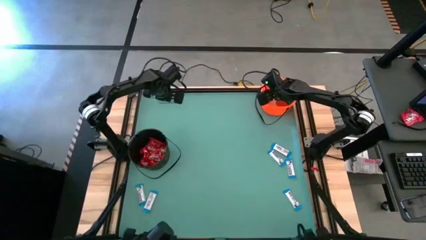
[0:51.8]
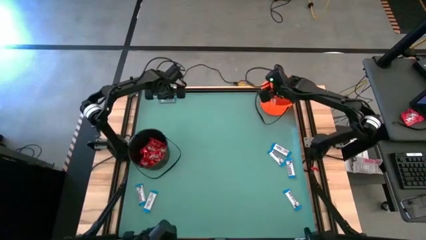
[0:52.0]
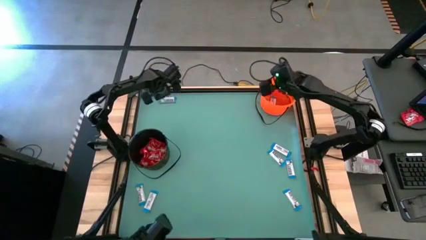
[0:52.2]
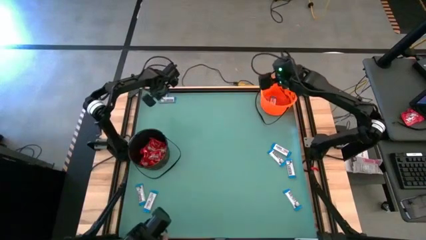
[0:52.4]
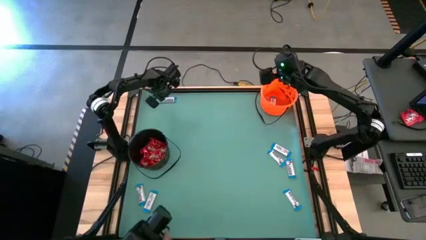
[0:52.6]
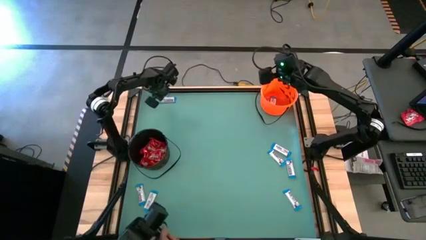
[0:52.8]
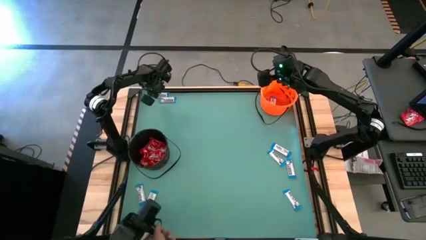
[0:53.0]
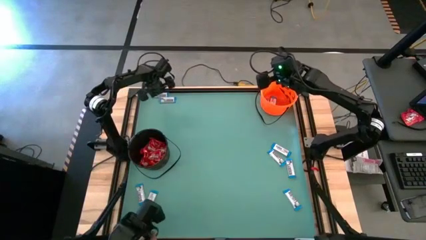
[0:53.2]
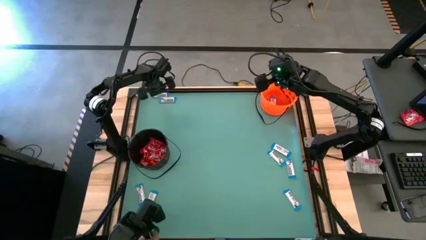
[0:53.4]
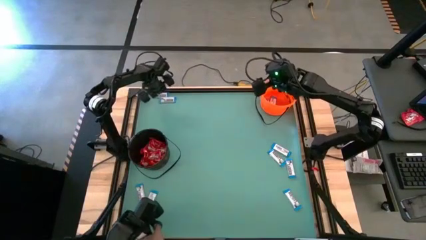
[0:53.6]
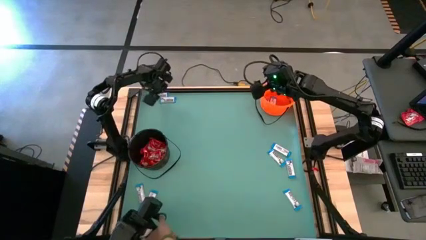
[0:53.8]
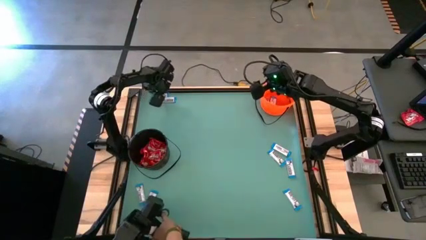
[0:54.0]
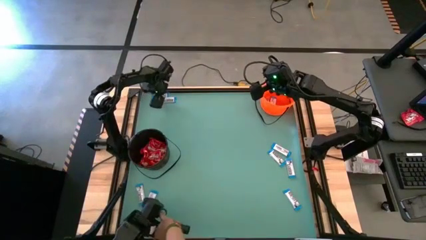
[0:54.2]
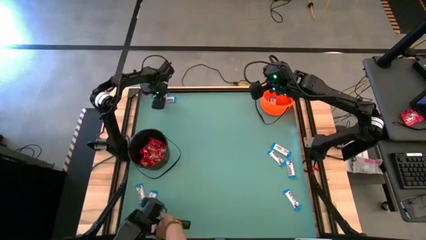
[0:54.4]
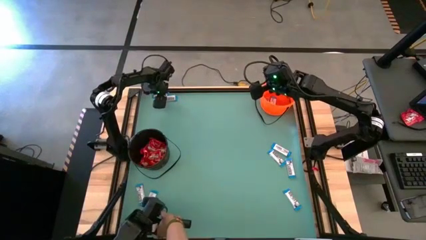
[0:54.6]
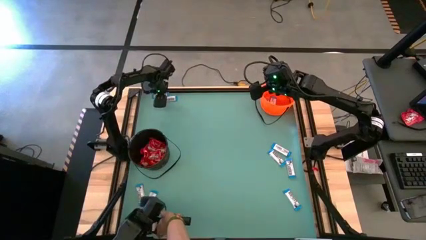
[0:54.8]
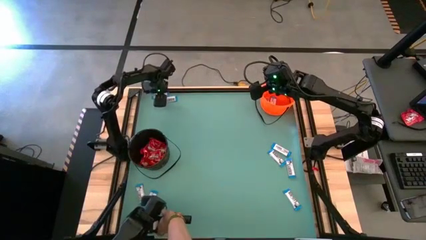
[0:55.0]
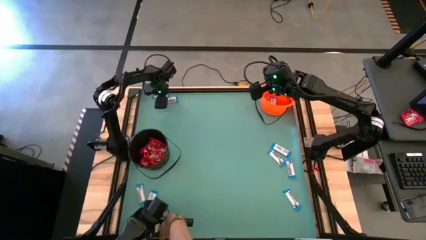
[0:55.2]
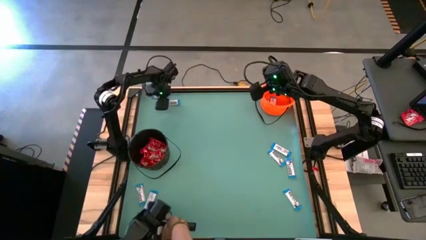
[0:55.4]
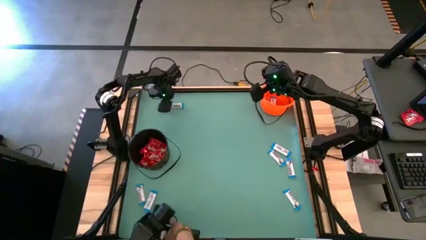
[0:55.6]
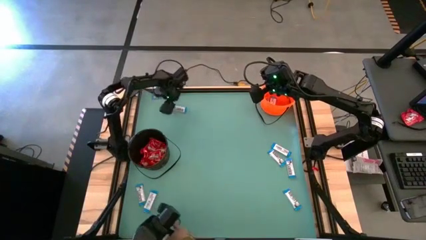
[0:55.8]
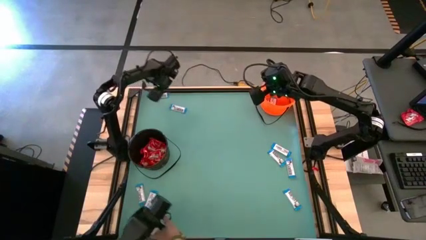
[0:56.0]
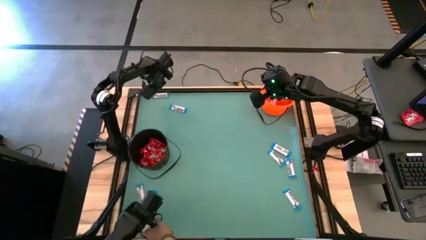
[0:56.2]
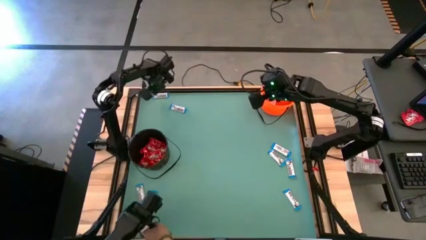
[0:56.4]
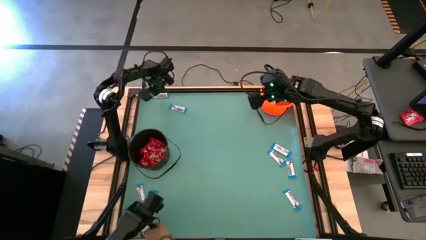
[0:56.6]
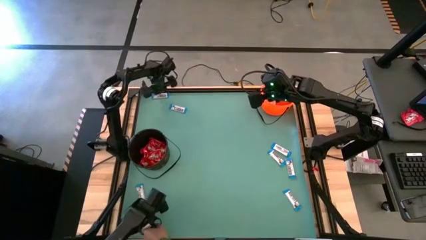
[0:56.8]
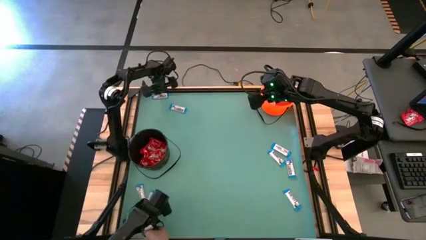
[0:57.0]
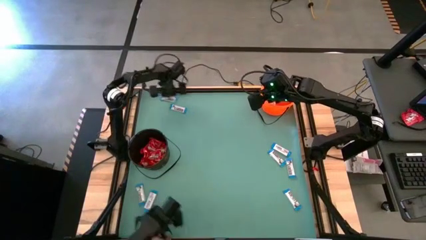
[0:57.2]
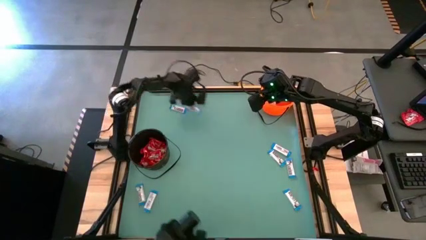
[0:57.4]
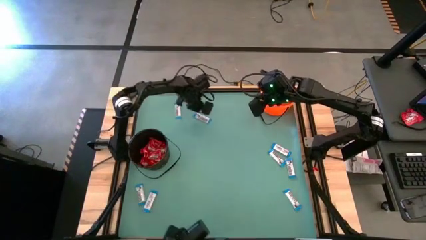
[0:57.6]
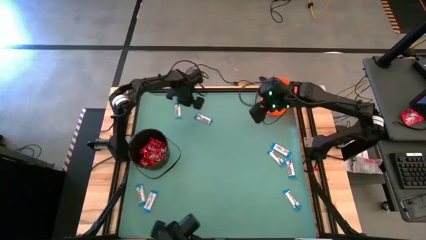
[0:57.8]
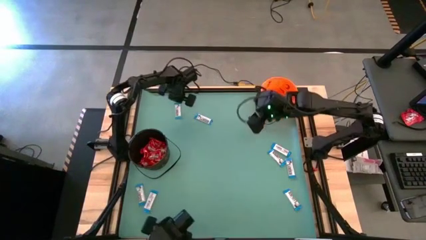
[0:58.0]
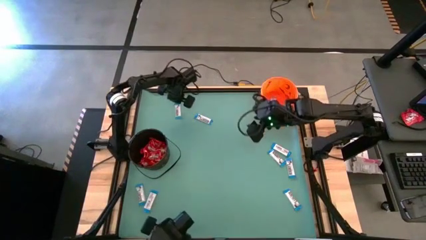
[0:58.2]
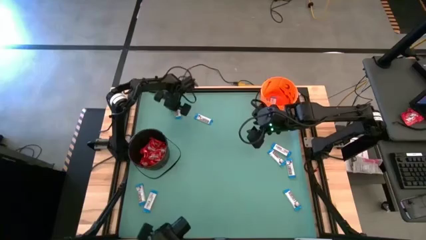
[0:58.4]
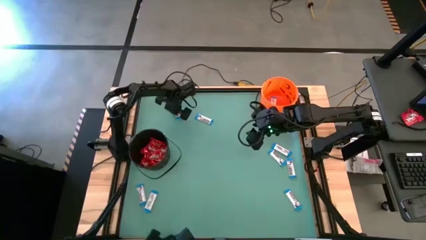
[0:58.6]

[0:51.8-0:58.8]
Task: Sort candy by brand, put in halloween buckets
Sort the white chocolates

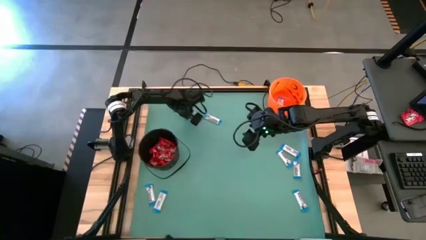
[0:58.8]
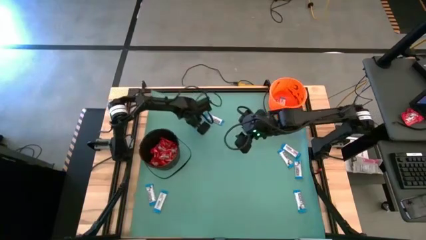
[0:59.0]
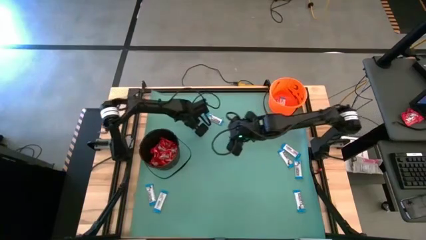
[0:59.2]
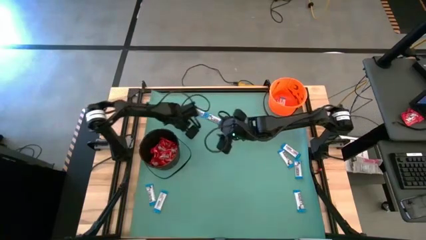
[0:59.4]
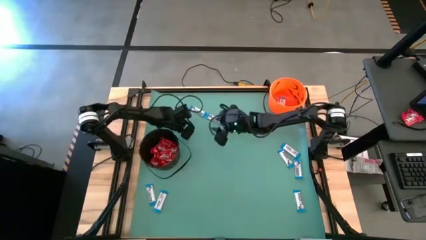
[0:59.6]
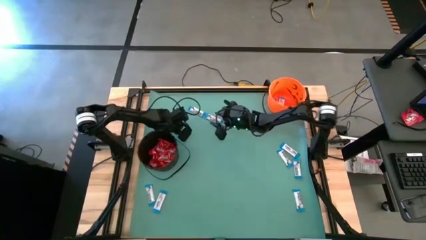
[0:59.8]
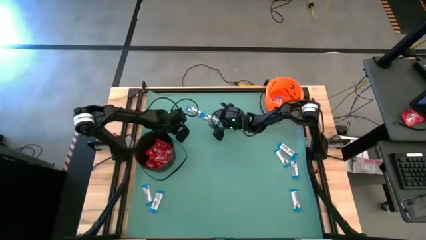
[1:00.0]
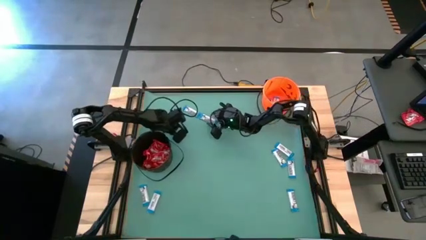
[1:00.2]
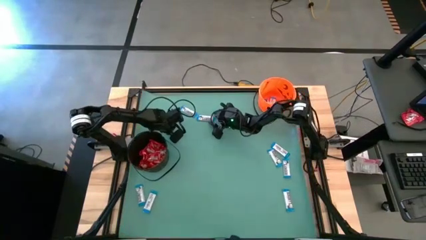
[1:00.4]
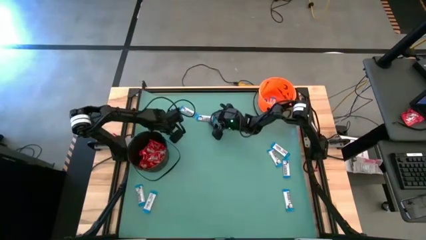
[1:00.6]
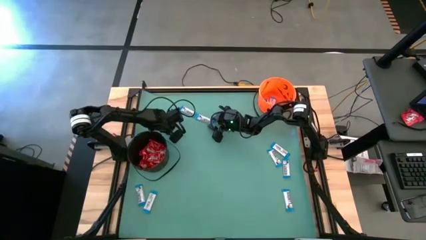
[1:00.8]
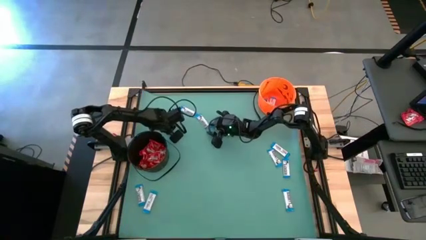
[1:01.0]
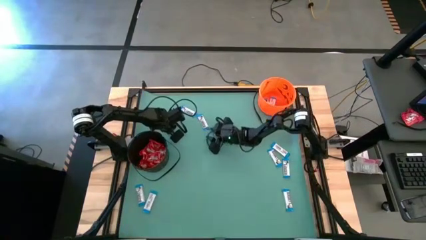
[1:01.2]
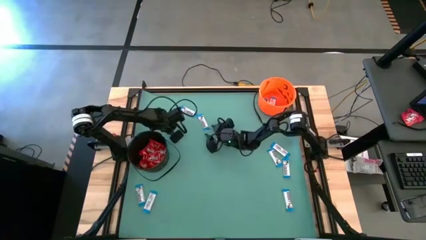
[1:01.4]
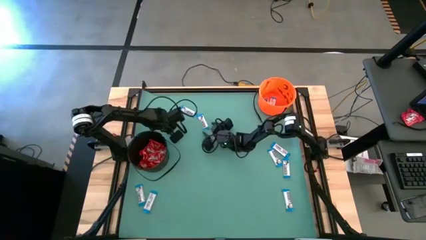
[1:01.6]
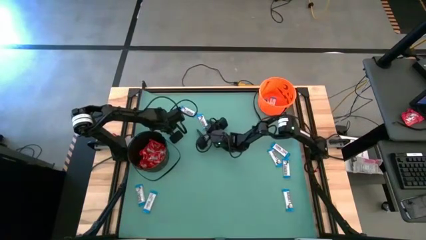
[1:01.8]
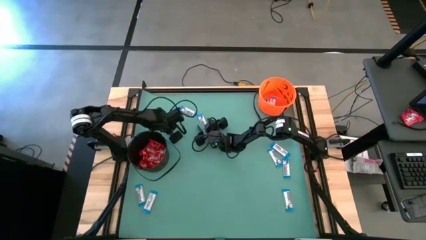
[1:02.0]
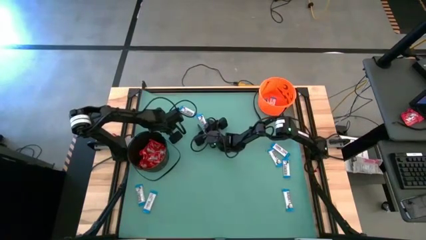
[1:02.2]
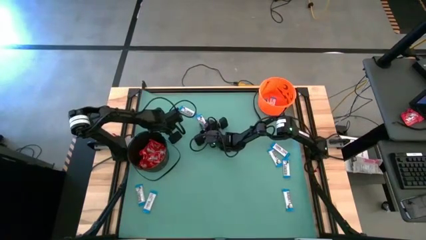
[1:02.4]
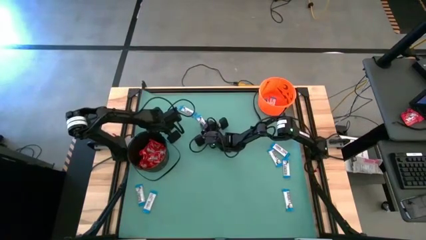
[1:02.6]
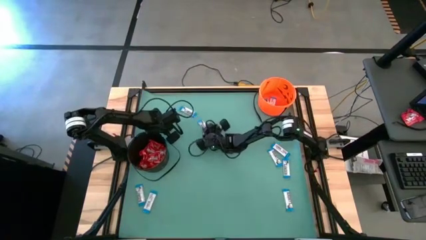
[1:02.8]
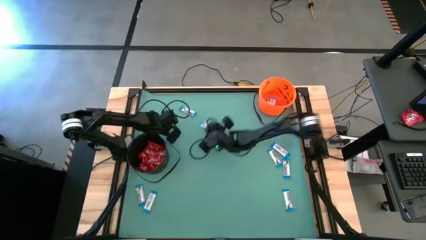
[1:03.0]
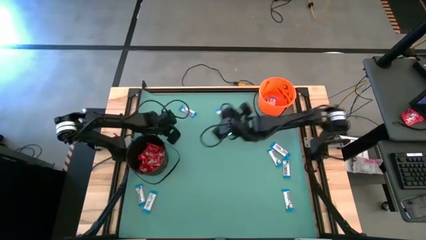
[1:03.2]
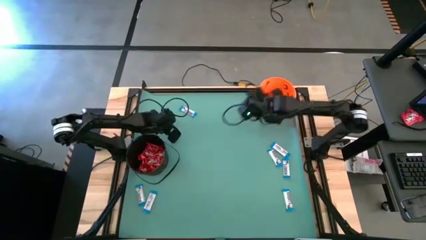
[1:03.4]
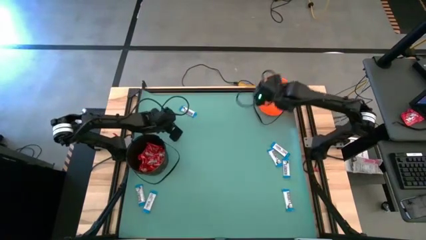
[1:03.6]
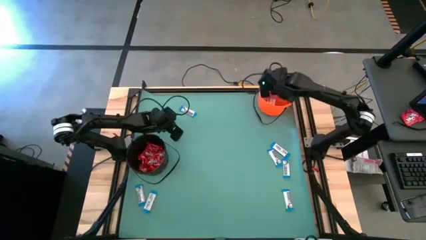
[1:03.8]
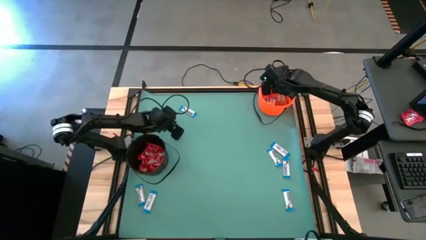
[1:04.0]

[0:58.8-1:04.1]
Put the white chocolate into the orange bucket

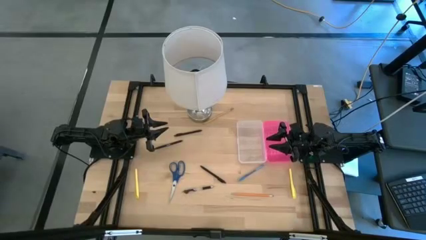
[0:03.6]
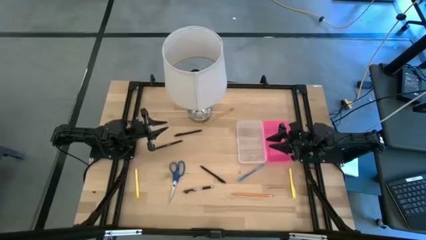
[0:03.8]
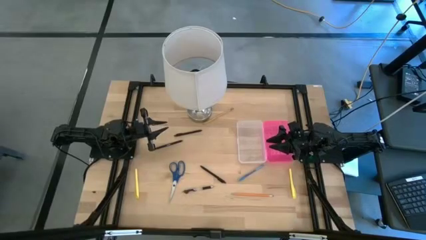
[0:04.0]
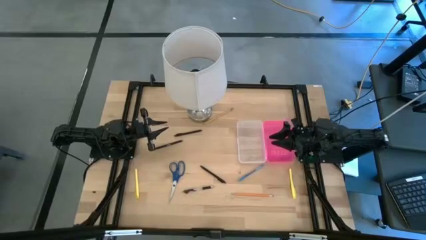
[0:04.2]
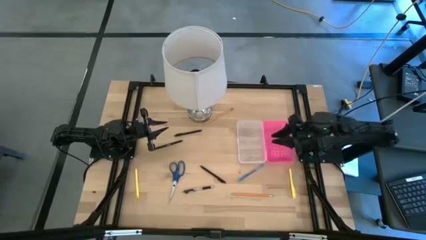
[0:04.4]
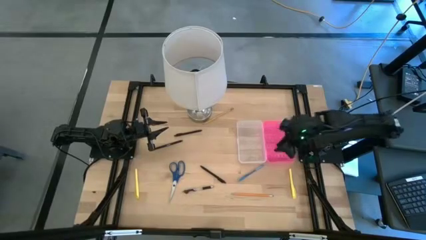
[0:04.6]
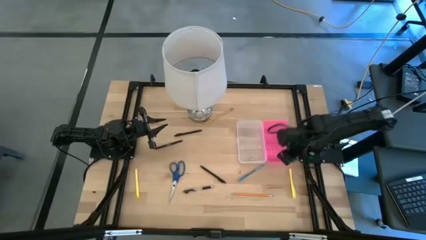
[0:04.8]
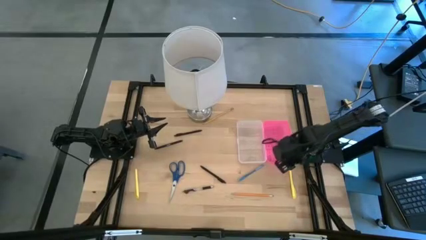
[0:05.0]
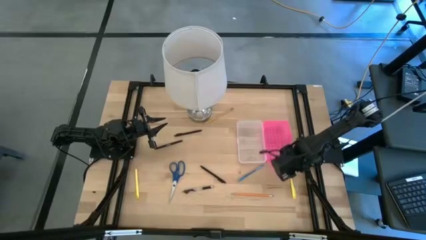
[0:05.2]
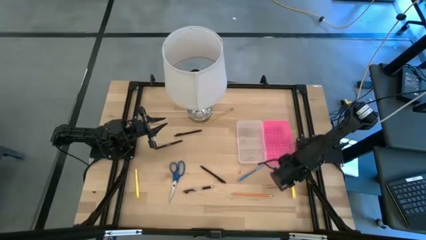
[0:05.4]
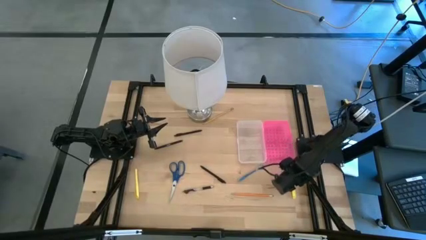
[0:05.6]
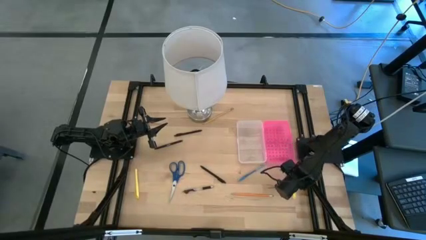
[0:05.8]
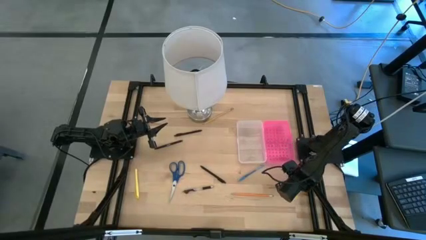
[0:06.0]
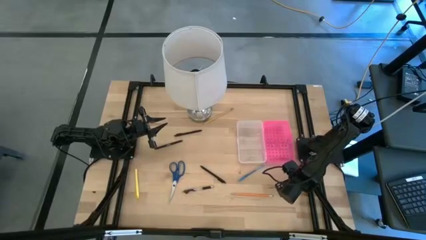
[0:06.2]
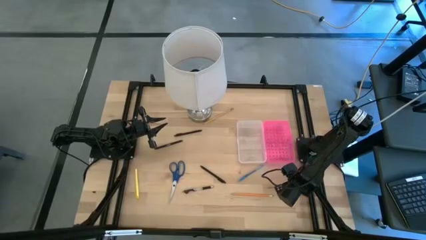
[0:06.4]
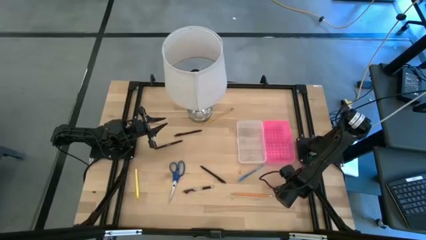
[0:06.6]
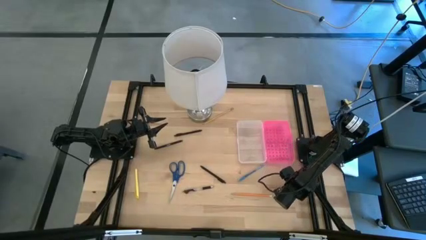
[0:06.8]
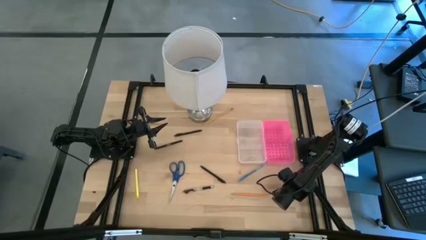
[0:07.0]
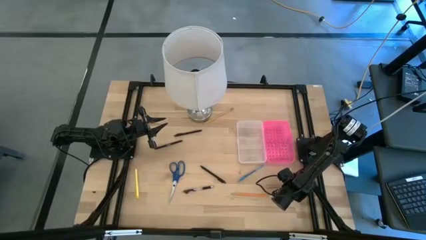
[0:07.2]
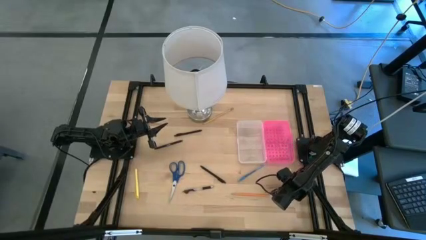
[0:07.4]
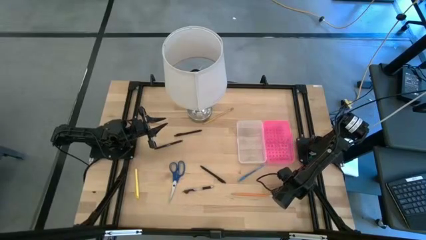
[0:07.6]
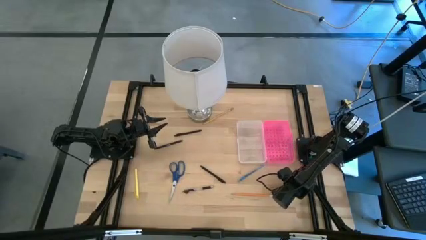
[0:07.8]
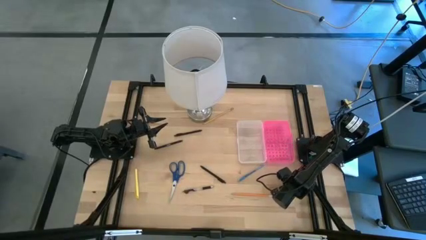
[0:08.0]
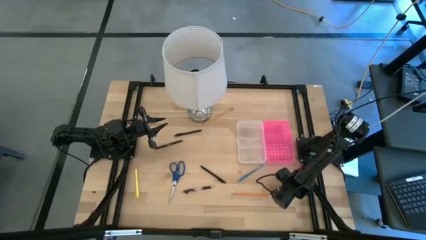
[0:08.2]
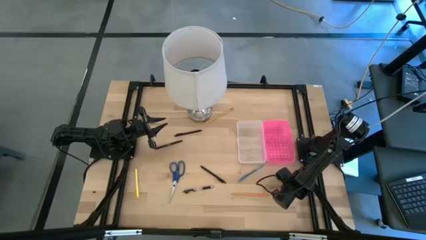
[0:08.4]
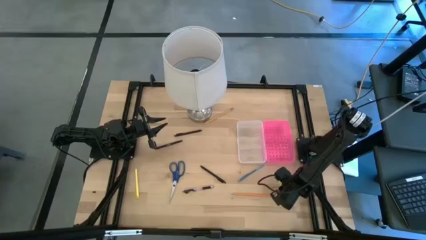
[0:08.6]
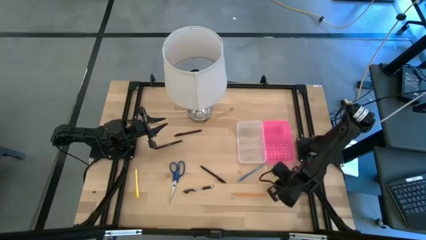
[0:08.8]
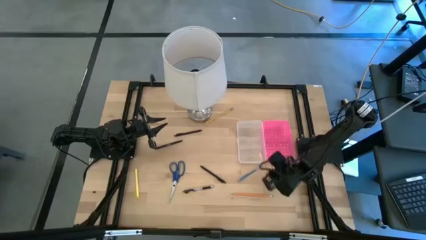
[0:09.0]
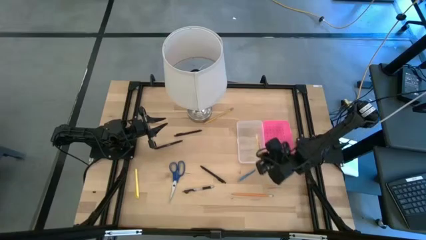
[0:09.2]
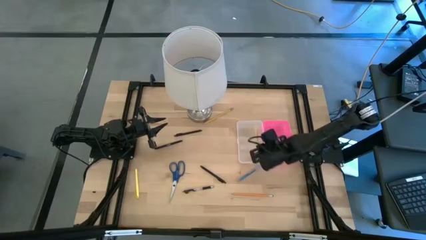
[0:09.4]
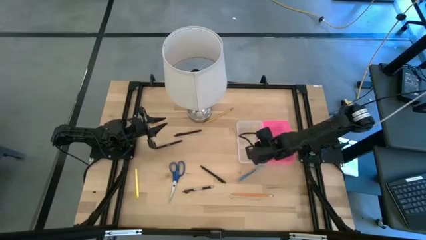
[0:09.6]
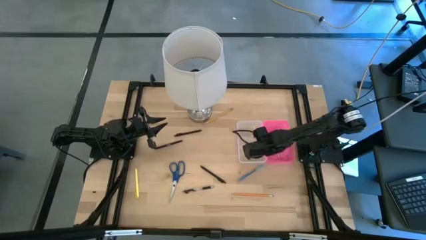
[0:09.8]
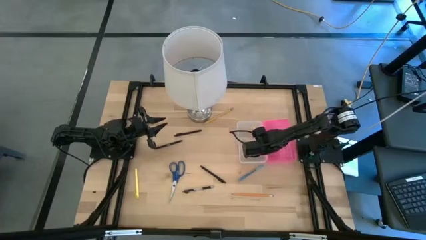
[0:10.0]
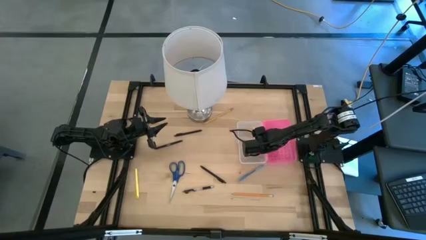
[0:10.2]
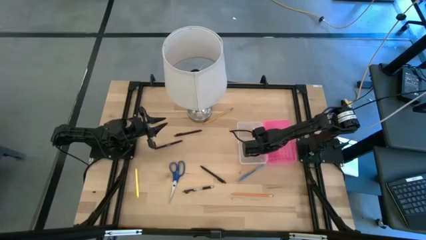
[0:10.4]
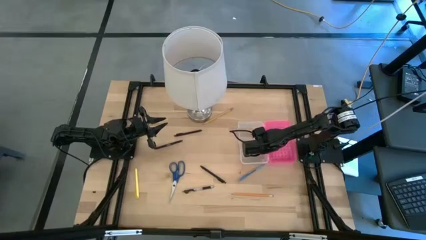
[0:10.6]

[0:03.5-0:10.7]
Task: Pick & place school supplies into a supply box
Put the right yellow pen into the supply box
